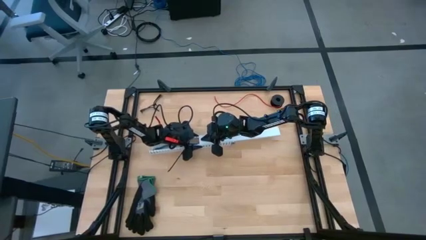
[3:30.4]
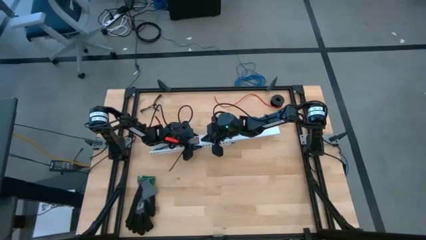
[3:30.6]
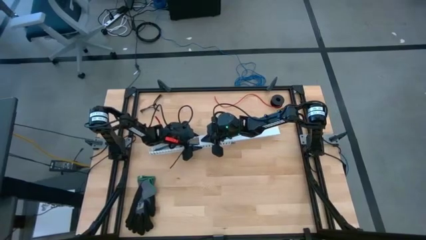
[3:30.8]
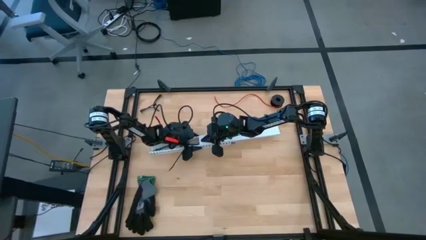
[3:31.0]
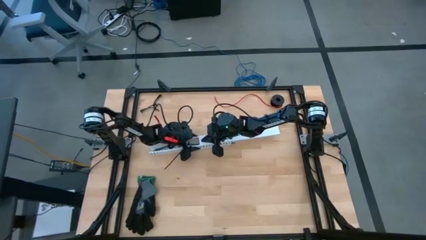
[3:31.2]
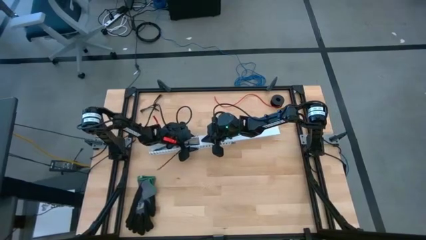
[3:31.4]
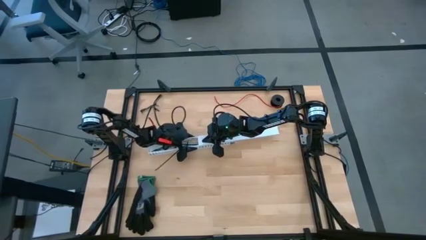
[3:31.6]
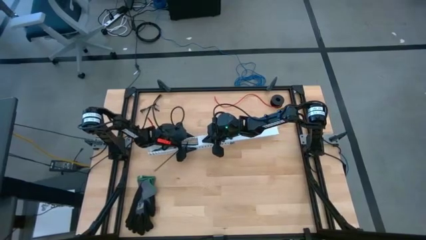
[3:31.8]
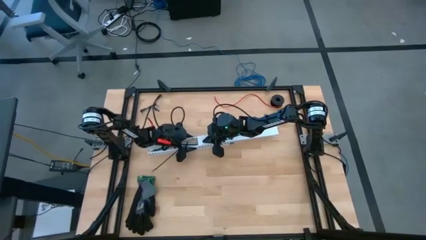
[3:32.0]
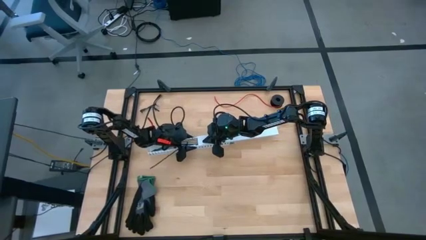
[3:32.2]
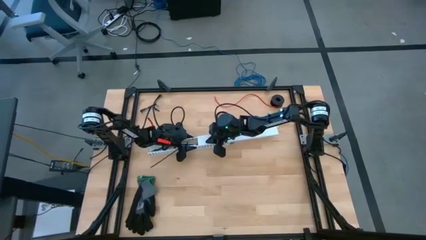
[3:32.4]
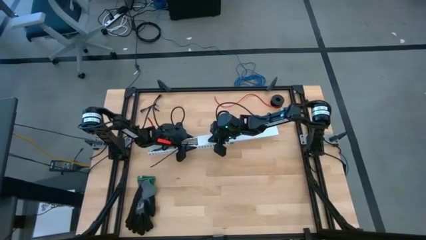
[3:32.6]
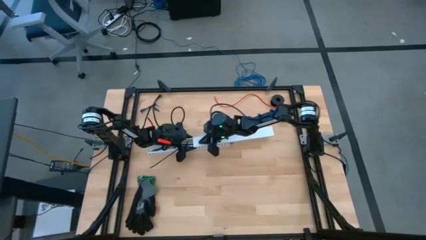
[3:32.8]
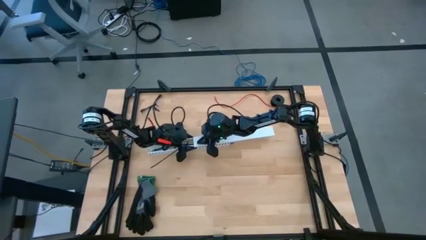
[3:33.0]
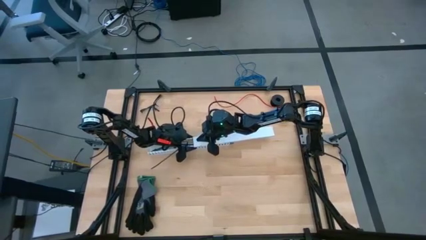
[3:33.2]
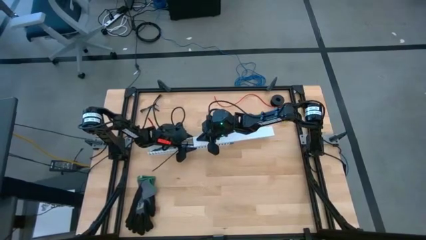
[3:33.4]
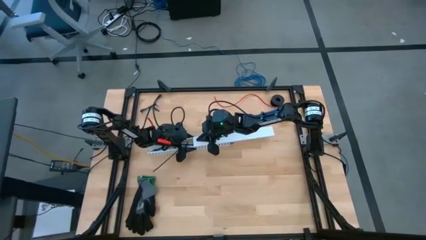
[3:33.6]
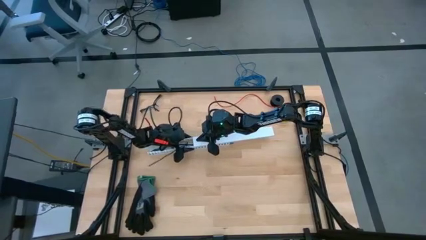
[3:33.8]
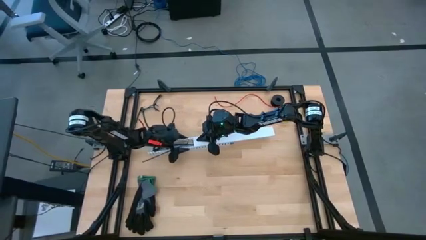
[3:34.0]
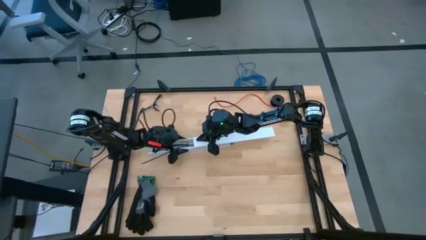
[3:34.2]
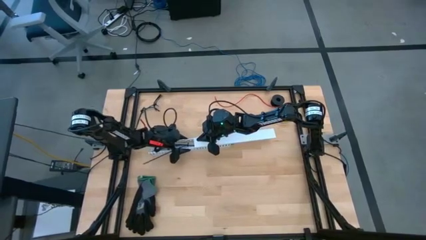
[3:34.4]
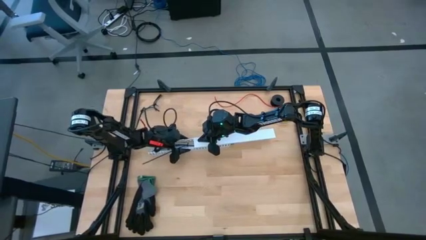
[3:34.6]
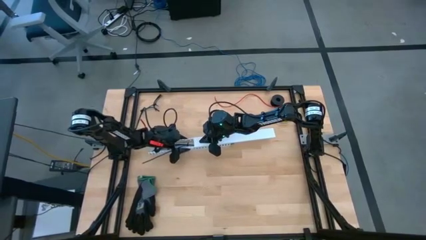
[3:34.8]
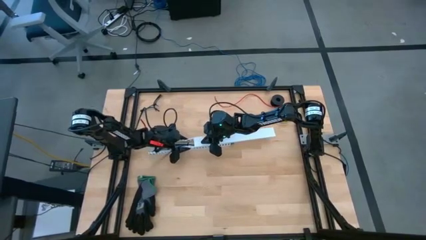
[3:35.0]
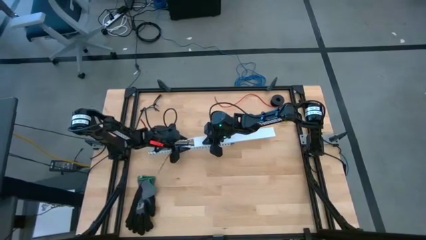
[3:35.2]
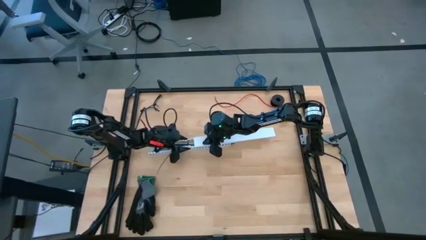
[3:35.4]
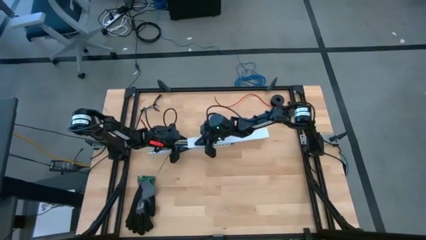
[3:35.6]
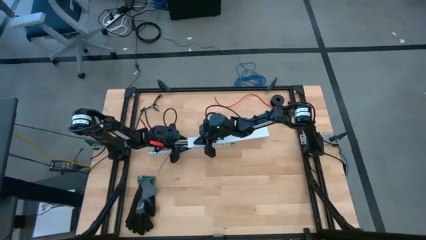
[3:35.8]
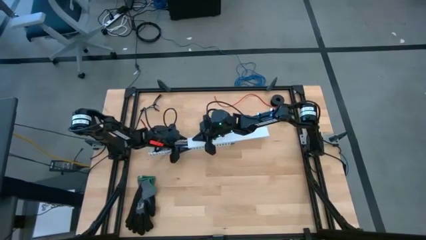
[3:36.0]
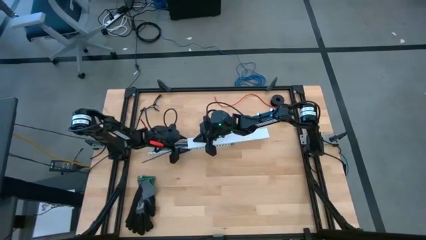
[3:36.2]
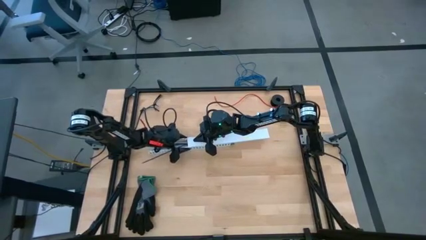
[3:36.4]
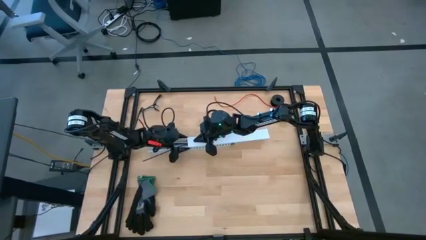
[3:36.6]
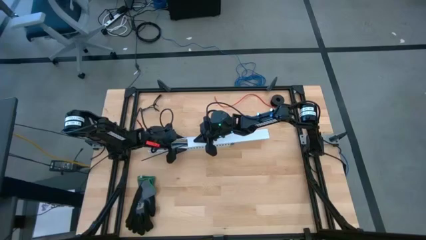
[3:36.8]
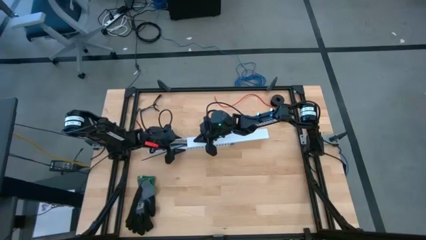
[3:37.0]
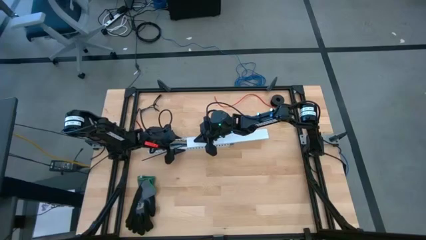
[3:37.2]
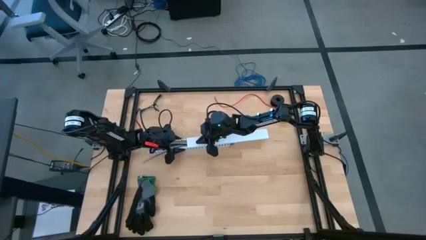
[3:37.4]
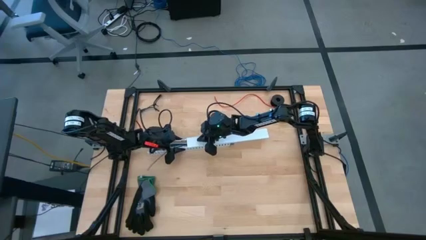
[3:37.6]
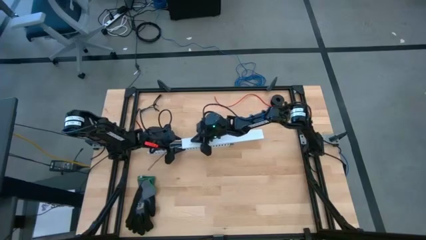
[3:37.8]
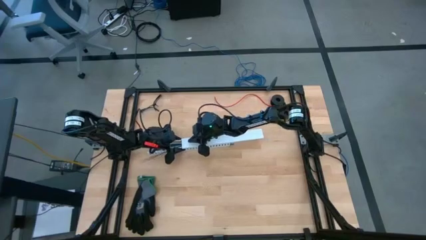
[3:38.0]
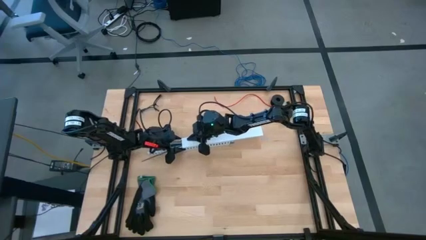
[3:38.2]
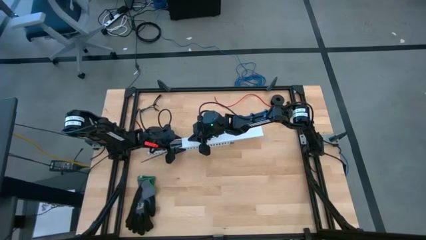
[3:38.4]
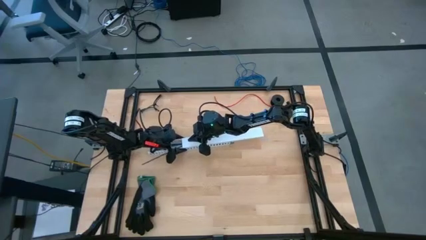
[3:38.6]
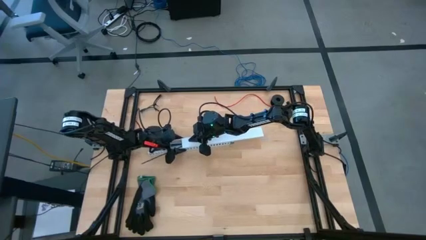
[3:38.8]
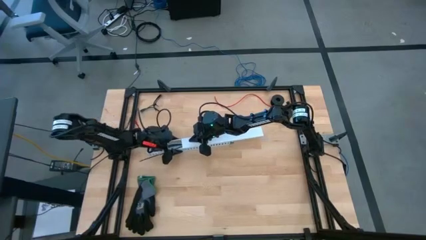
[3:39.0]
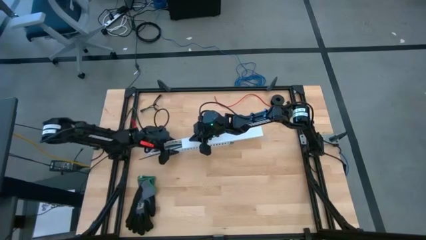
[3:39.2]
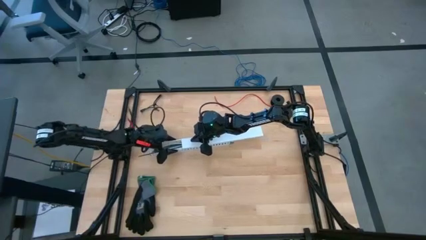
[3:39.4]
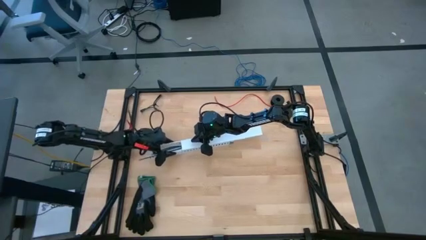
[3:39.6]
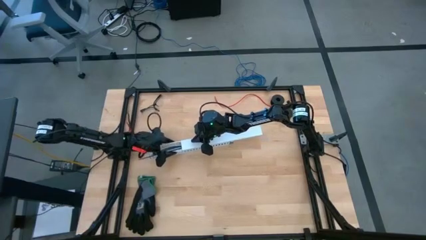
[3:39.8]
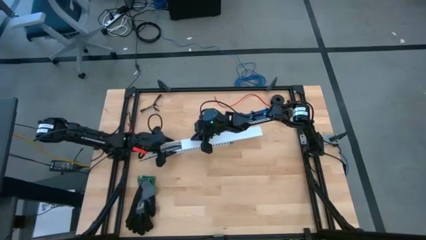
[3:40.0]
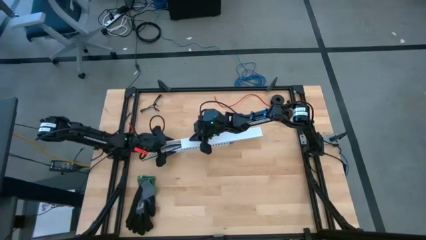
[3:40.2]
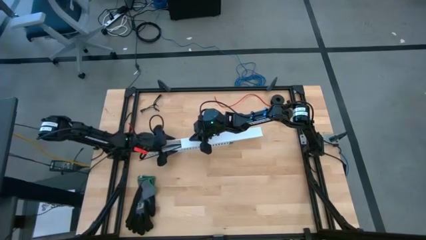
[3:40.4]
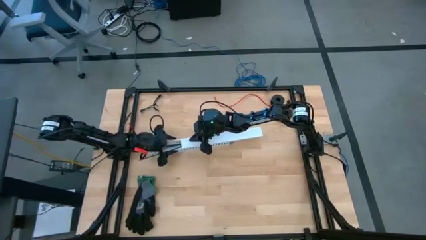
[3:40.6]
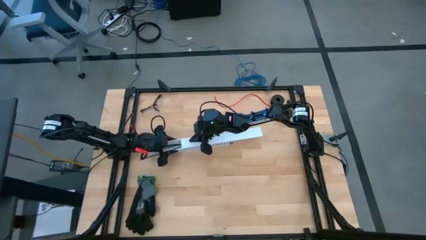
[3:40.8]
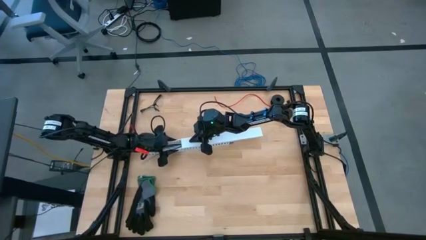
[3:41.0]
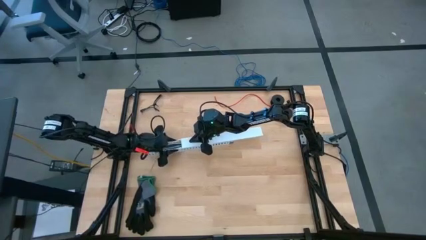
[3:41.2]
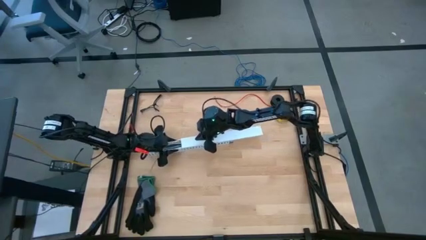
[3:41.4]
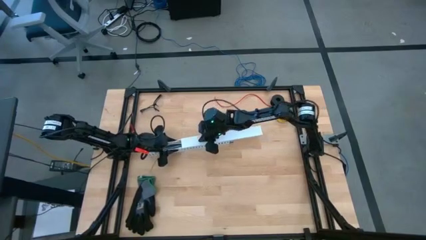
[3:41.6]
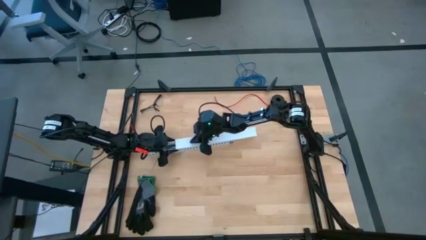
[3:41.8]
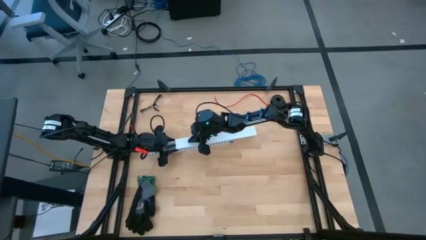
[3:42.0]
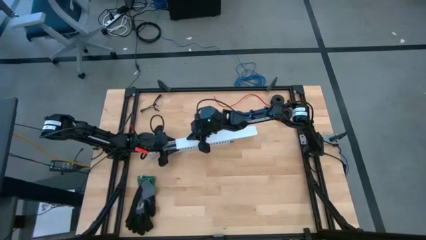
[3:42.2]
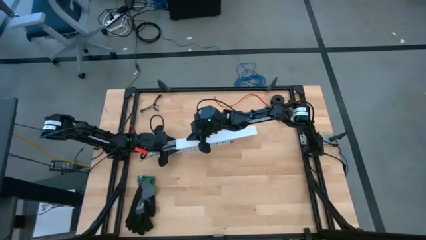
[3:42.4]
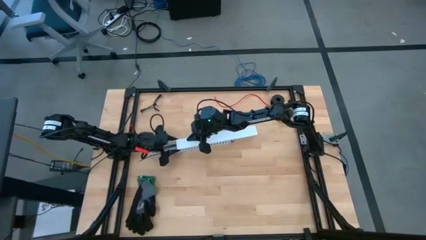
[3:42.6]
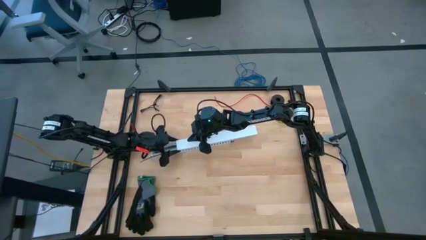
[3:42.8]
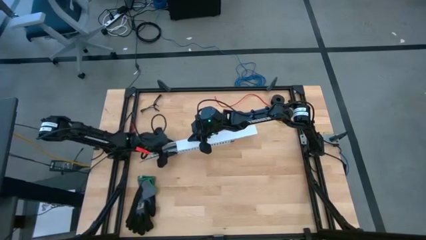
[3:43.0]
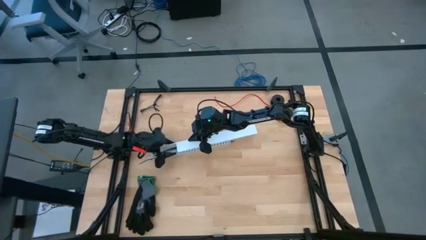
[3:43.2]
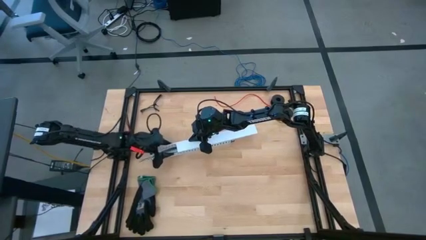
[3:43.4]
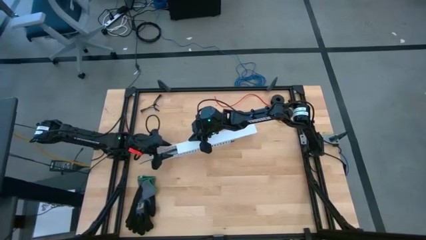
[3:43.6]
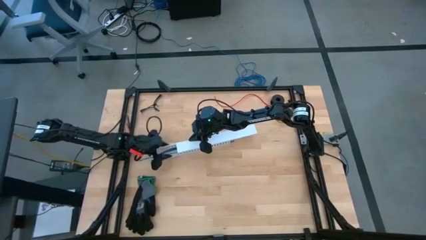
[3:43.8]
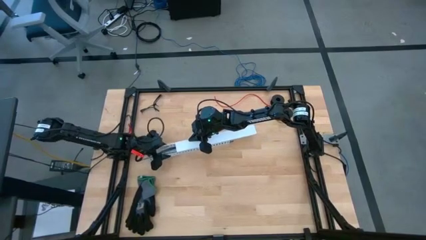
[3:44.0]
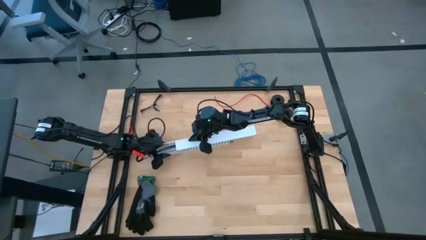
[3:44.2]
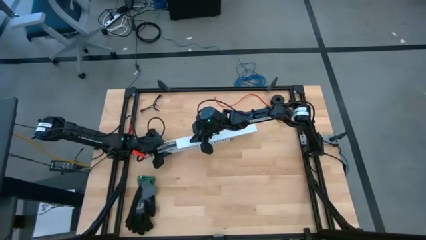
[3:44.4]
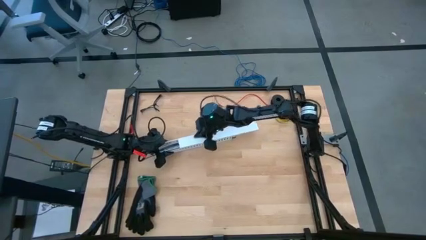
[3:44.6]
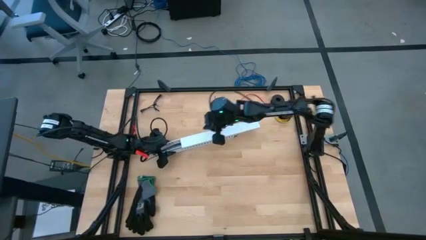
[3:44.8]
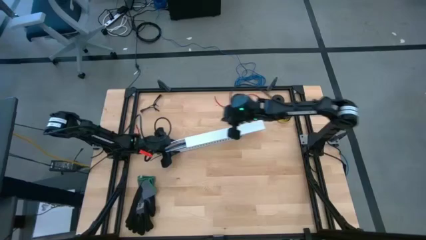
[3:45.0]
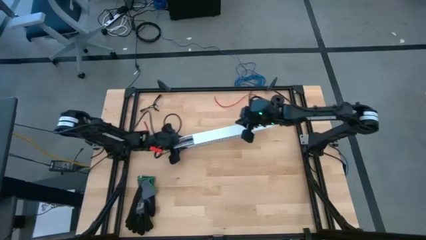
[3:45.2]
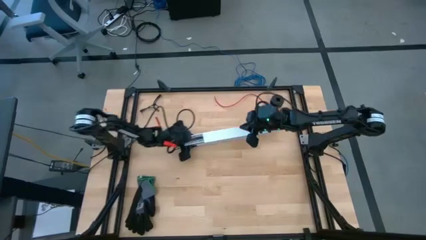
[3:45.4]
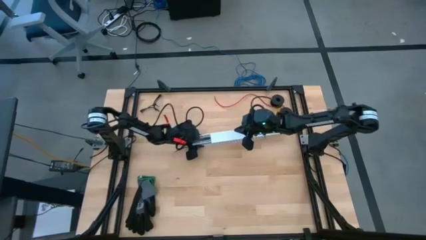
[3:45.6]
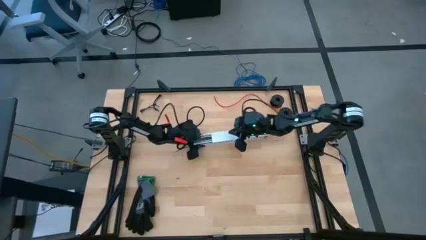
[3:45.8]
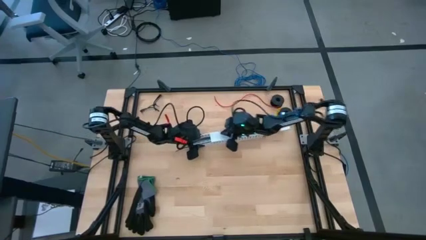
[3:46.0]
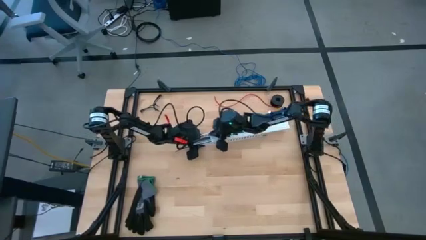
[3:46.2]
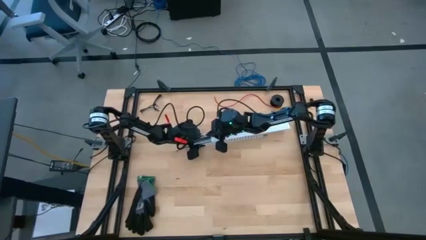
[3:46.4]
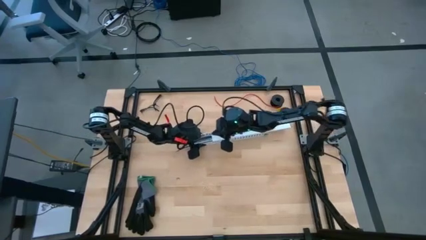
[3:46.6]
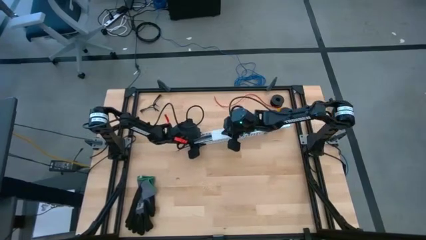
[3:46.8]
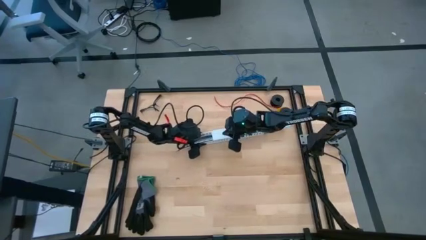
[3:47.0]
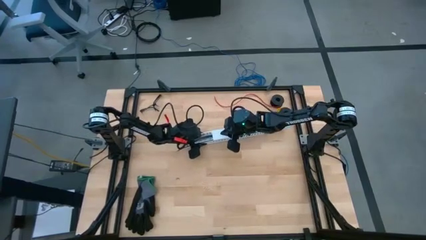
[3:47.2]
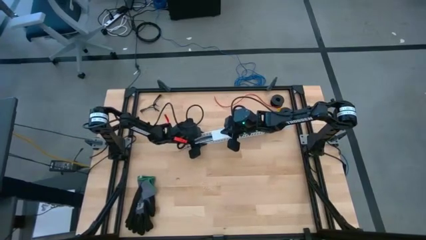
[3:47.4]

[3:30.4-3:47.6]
Task: Ziptie cables
Close the cable duct
